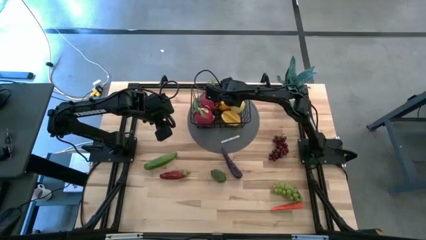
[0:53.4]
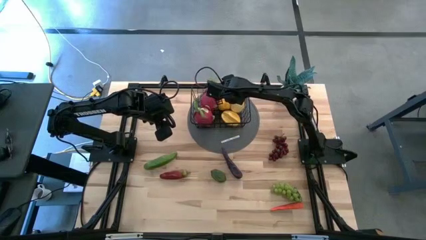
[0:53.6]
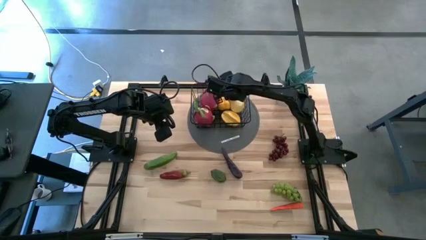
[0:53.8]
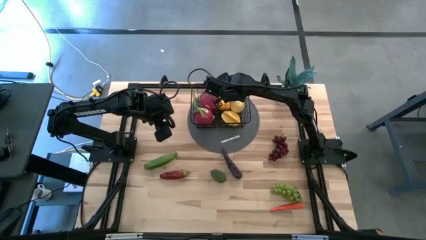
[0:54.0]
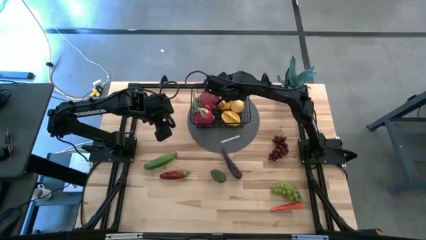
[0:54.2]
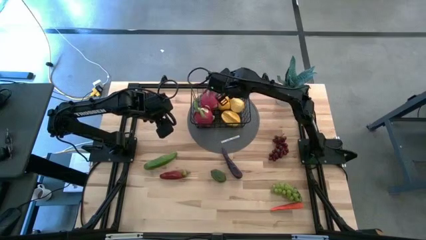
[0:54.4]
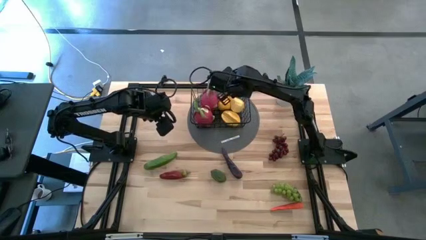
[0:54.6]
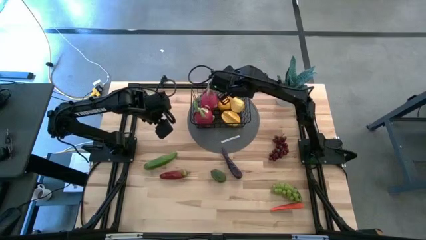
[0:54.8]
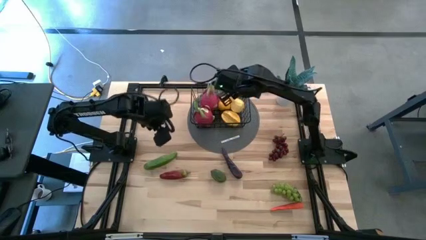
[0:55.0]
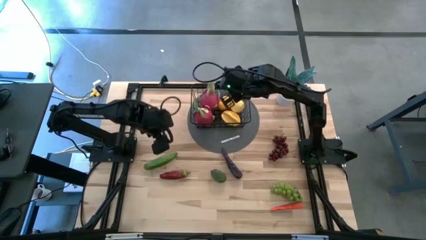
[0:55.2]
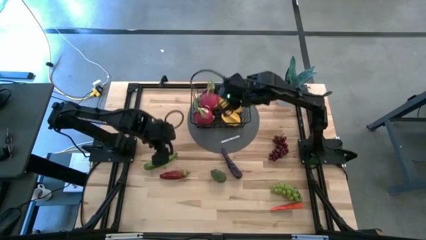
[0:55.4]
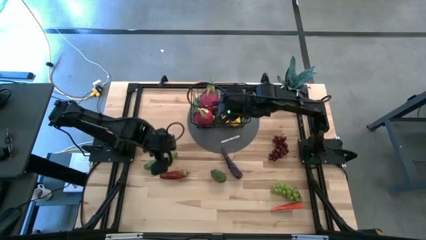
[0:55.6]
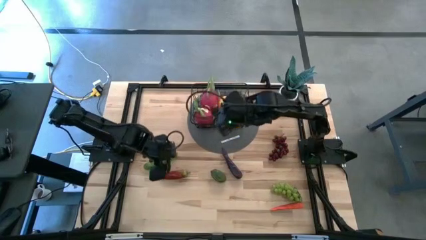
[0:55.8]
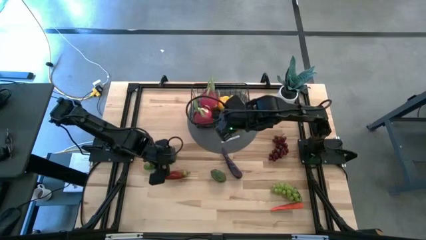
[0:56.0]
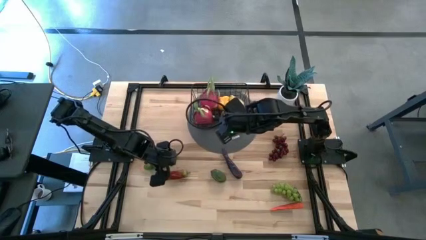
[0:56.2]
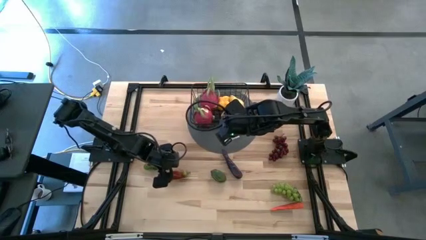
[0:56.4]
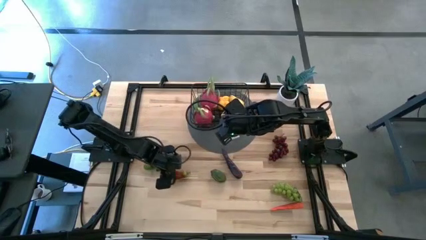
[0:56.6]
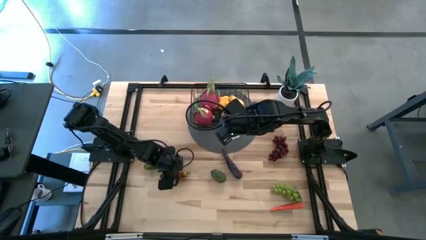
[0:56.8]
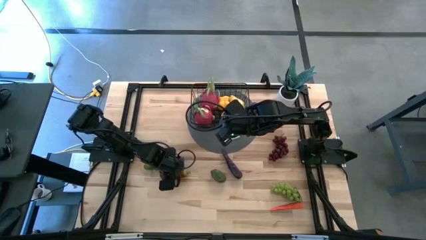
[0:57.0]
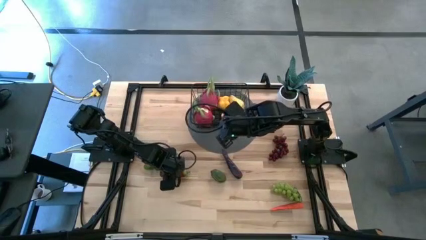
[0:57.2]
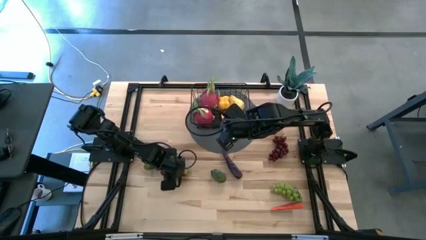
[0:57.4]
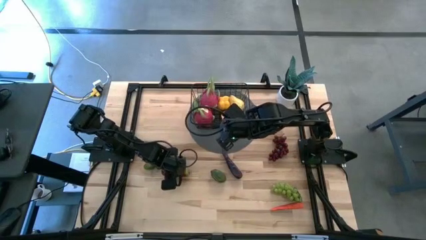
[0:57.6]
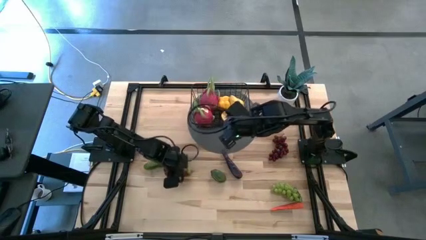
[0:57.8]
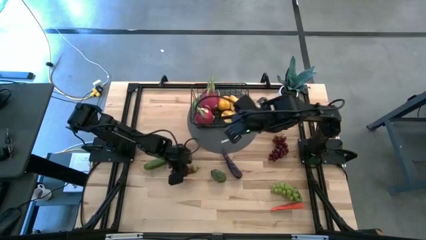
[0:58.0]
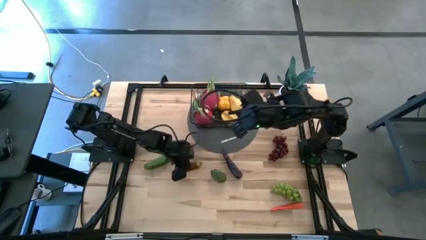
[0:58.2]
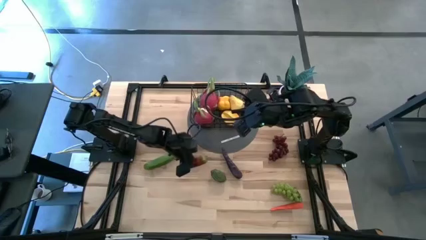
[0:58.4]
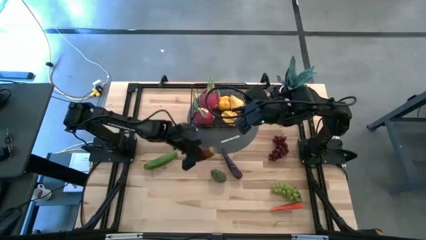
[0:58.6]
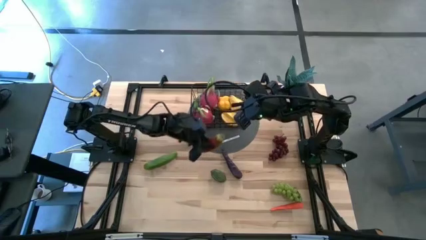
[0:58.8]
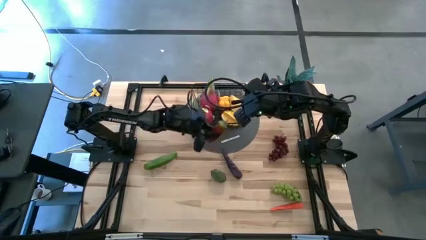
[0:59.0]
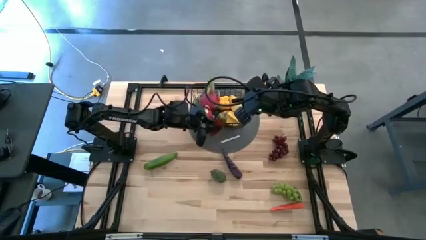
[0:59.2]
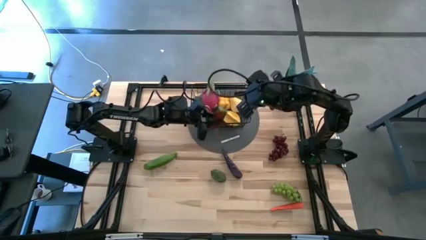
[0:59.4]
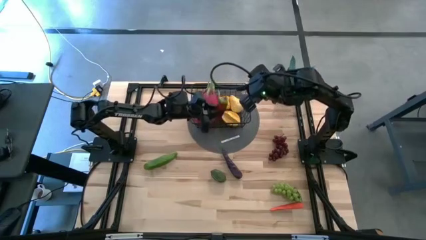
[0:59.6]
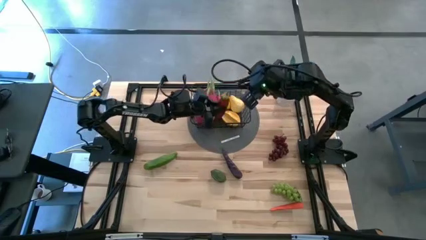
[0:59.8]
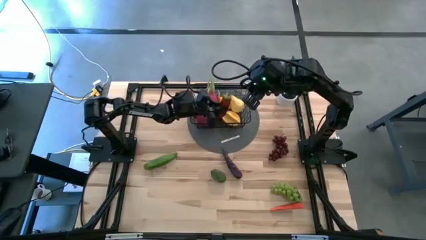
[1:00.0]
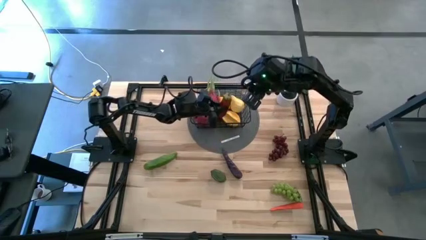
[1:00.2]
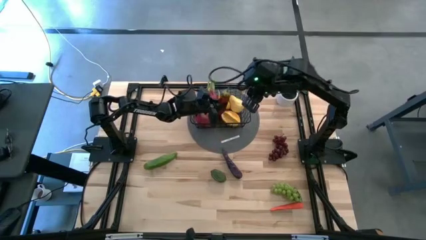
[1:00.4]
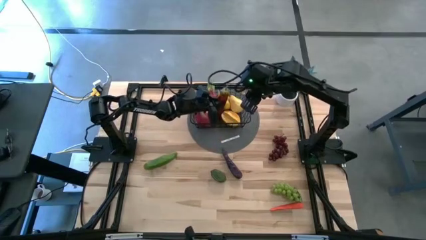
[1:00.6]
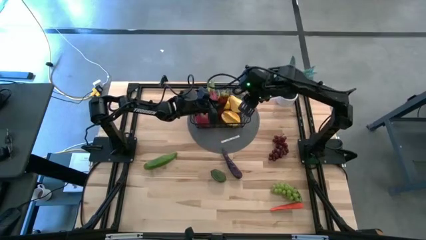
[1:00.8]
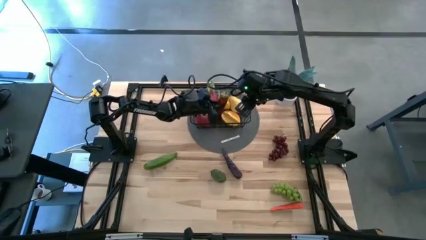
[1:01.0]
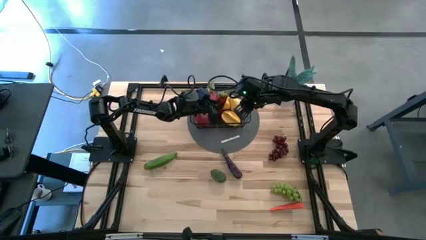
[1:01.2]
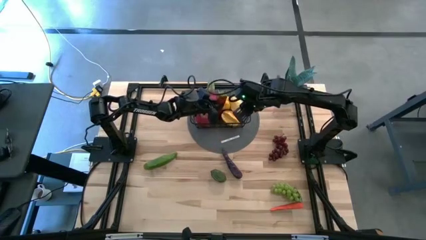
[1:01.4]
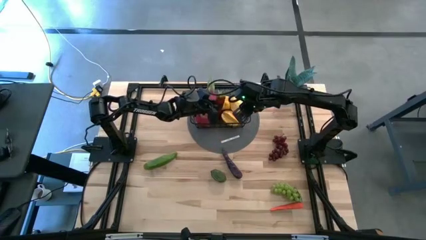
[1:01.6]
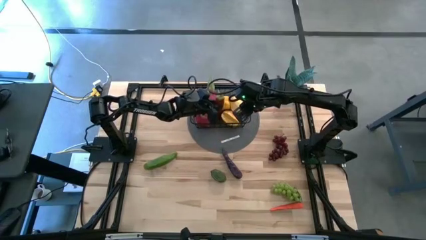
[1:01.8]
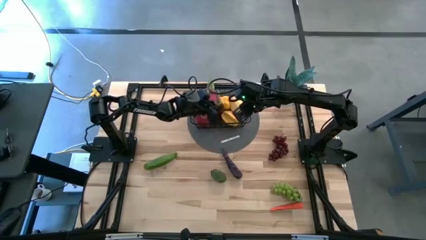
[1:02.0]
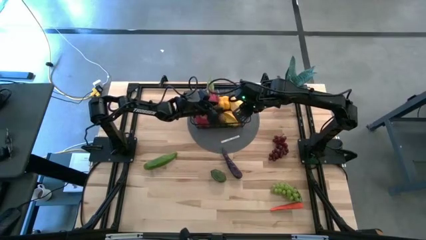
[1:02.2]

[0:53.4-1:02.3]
Task: Build produce basket
Put the red chili pepper into the black wire basket

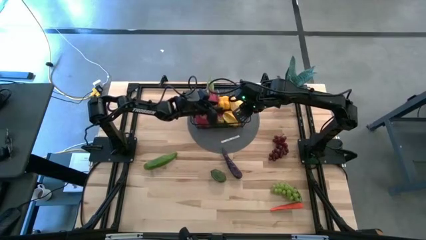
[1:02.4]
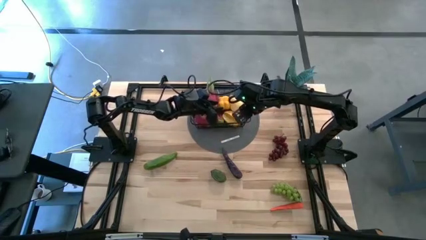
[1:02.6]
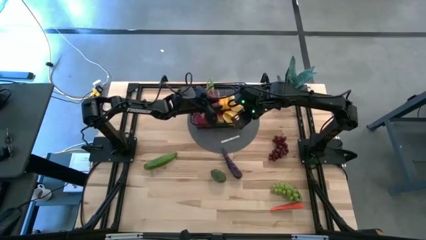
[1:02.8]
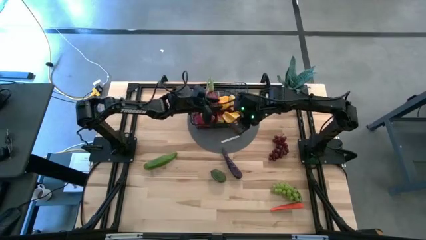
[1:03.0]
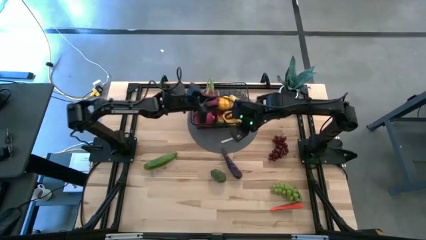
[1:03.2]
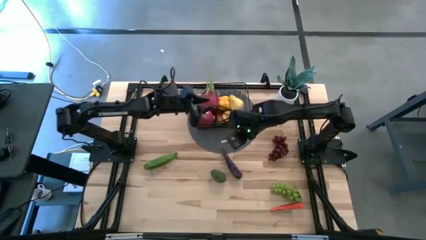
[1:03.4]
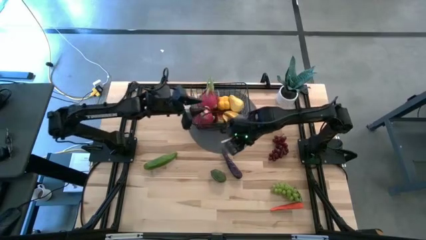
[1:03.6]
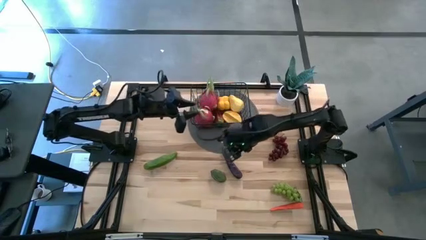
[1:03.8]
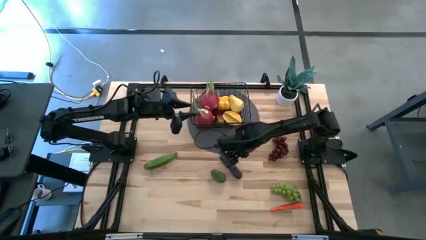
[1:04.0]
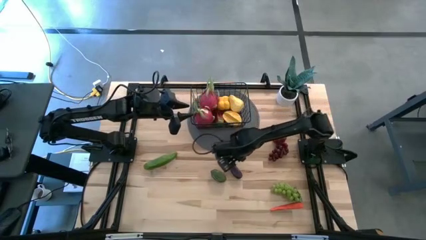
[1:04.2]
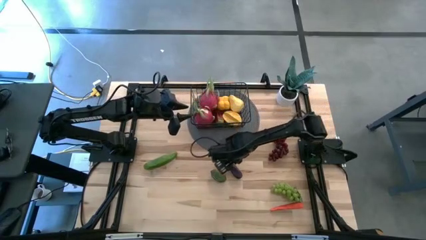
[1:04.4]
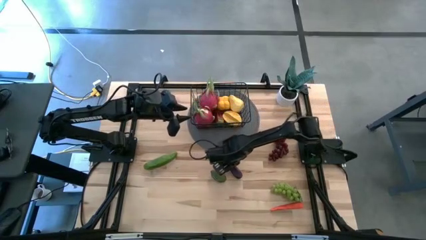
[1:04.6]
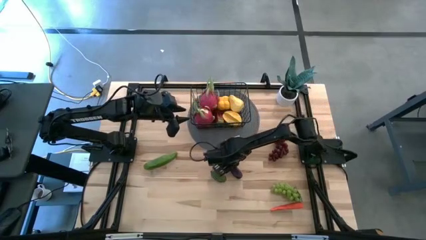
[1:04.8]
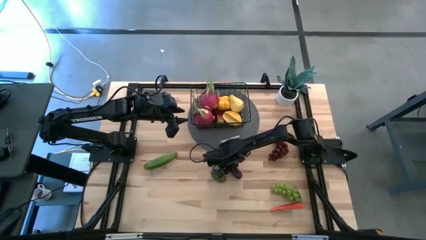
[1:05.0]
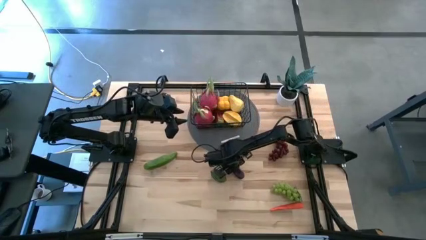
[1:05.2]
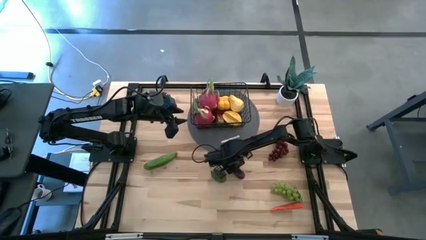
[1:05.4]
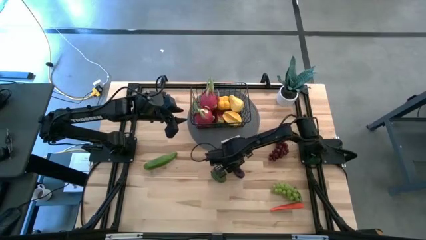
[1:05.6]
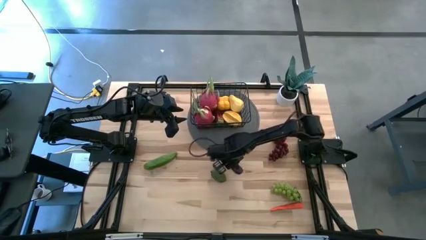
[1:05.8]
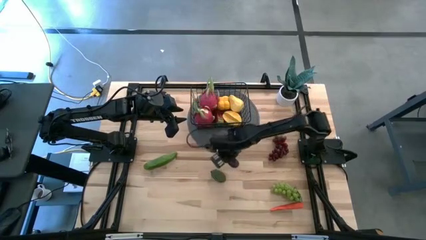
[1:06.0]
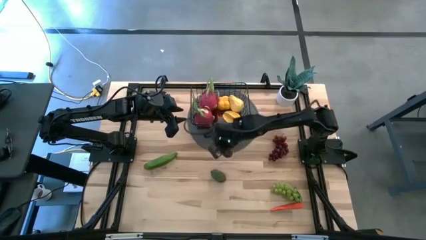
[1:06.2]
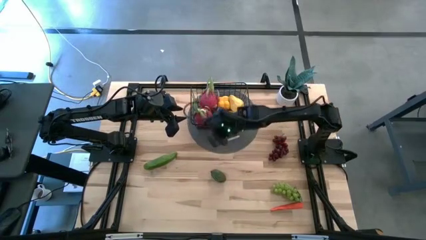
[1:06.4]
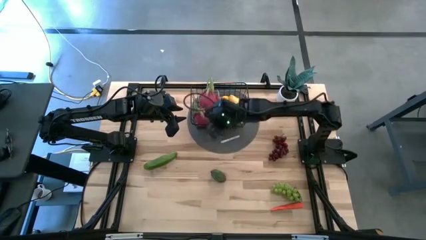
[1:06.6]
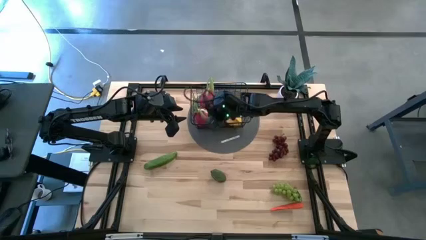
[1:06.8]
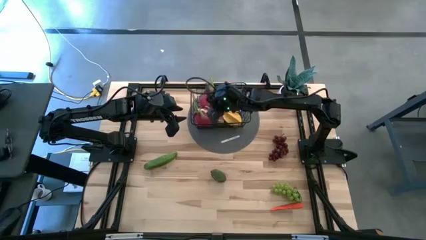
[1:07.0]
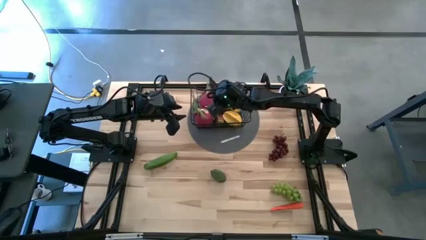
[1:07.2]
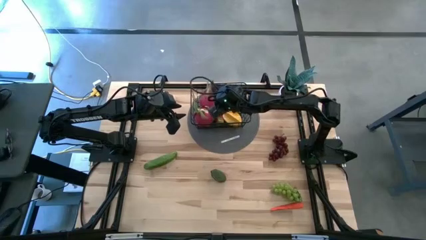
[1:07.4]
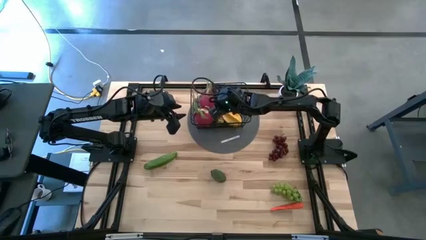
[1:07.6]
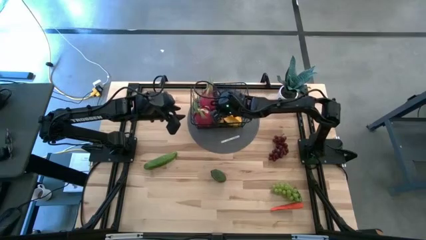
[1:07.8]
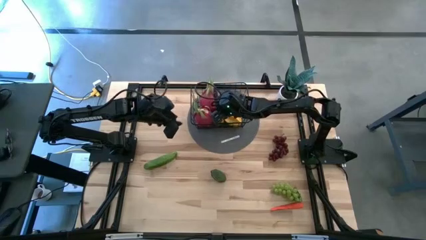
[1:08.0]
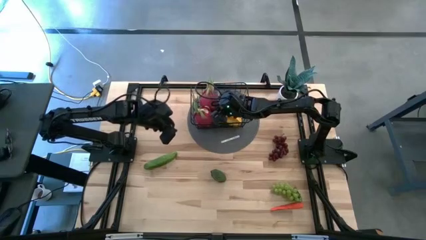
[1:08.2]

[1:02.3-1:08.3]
Put the violet eggplant into the black wire basket
